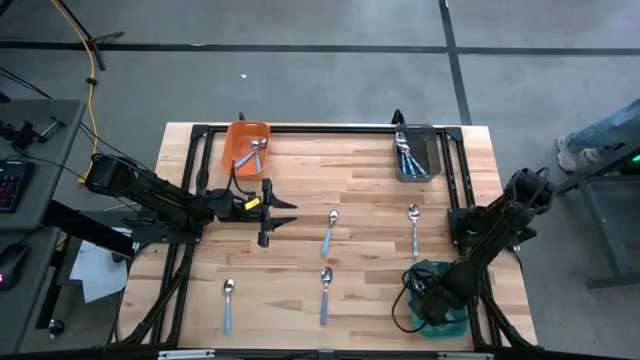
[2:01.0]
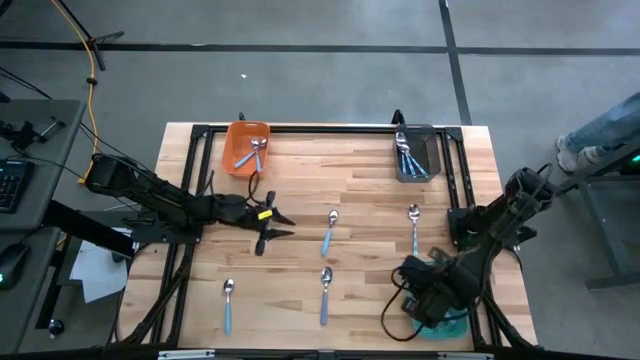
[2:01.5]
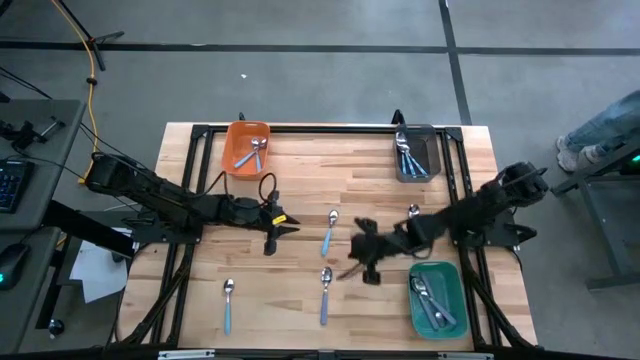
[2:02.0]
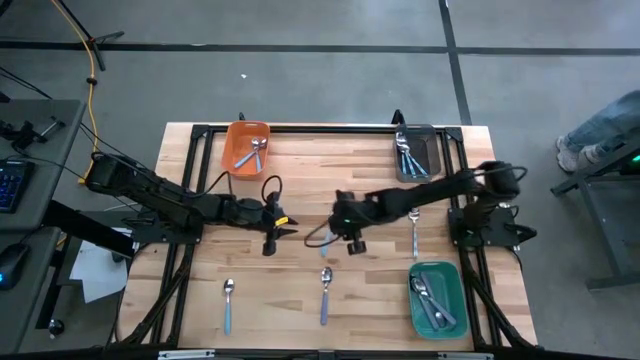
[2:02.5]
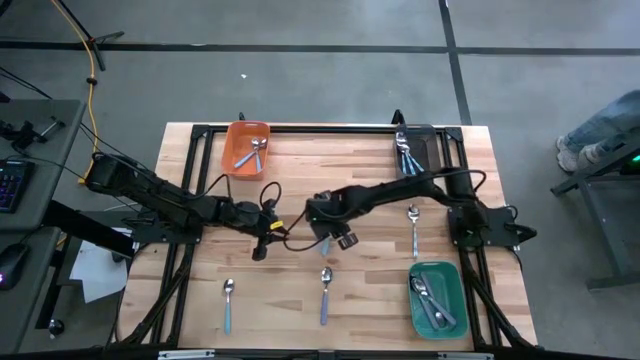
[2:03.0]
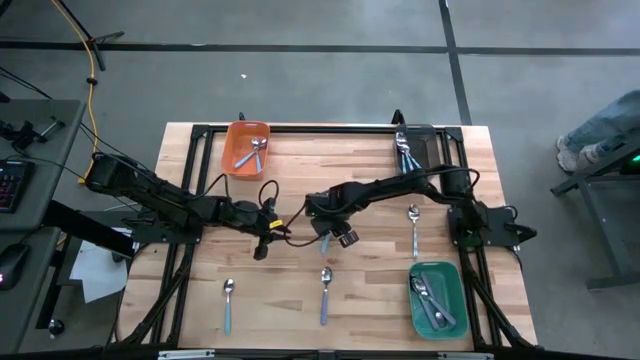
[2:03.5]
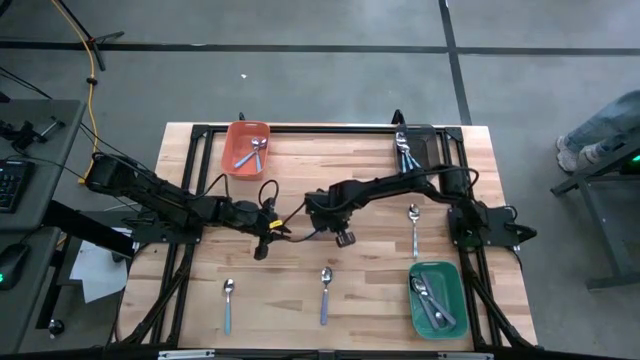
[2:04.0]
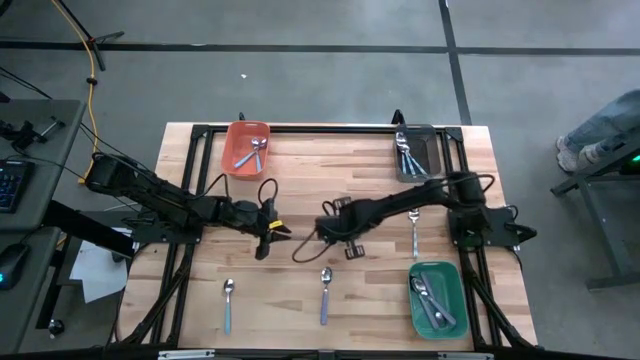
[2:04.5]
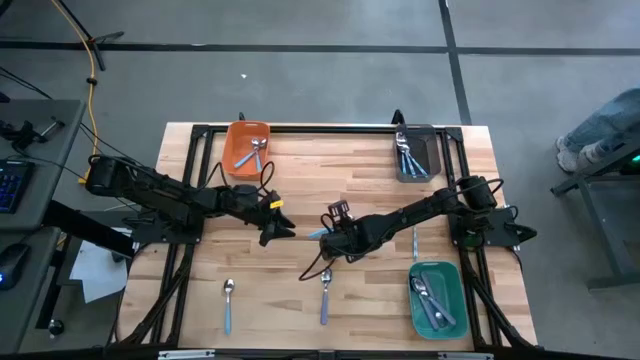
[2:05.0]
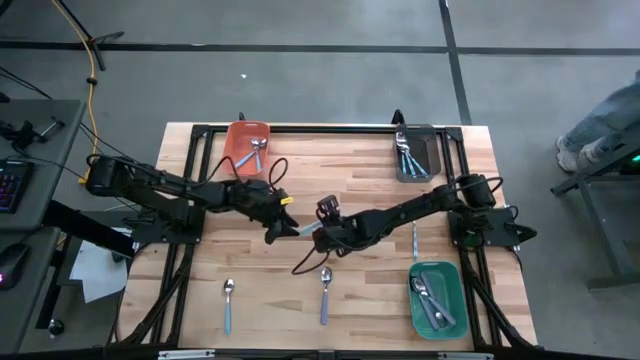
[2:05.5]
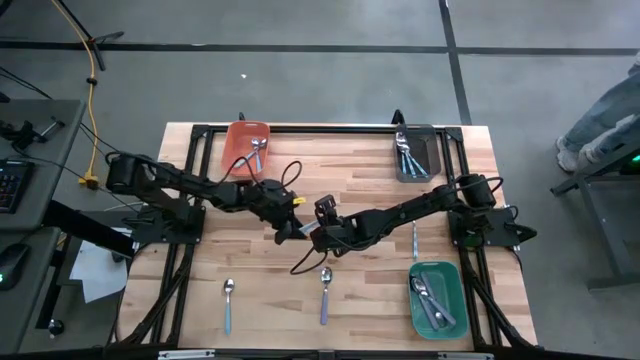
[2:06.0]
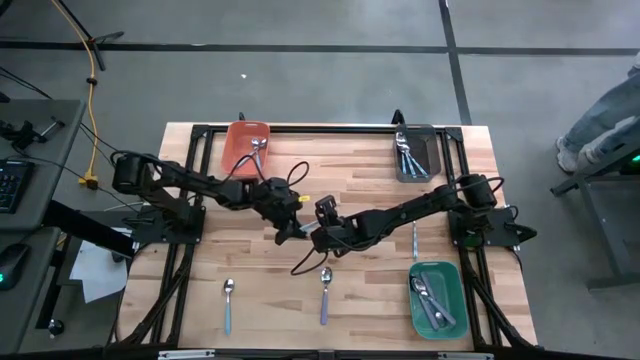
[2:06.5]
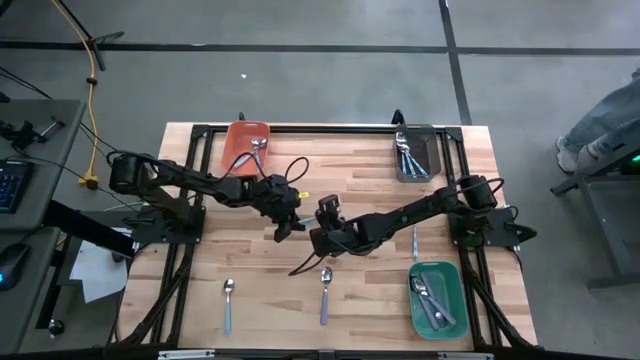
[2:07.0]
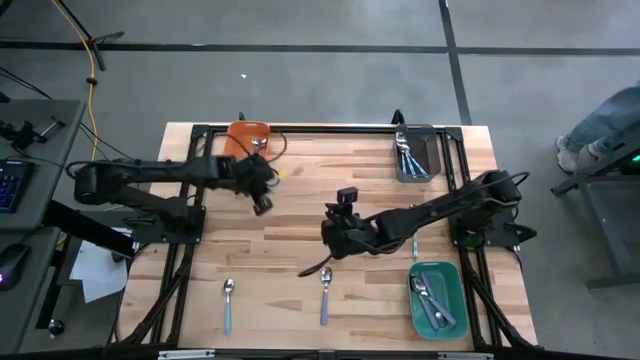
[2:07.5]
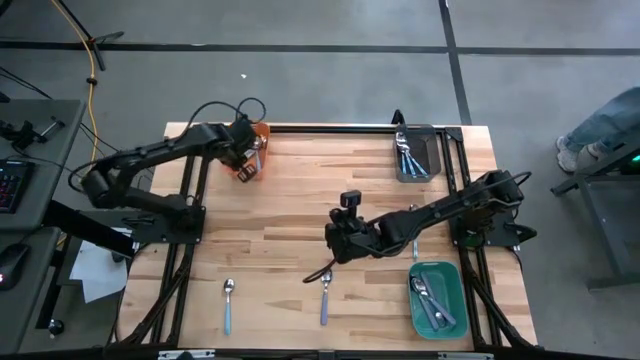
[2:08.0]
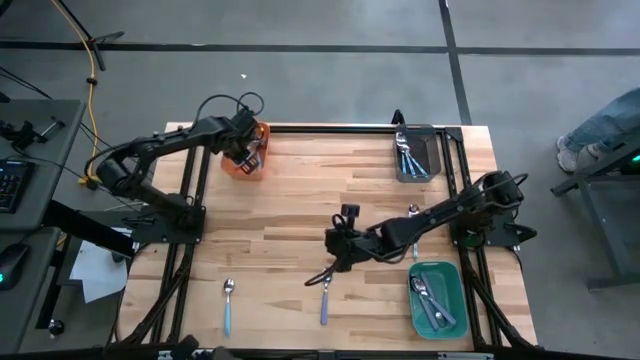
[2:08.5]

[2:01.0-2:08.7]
Task: Sort silverware by color (type)
Put the blue spoon into the orange bin

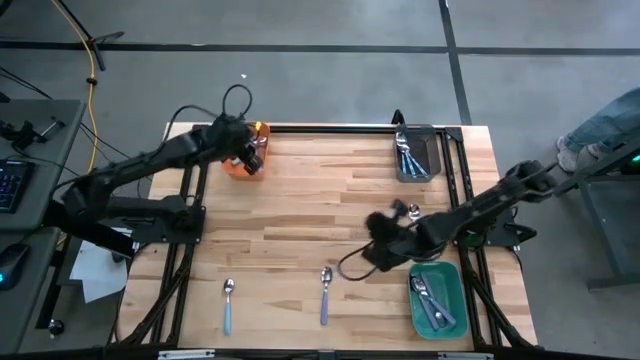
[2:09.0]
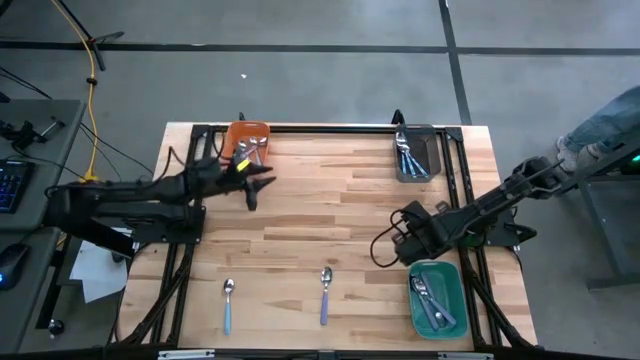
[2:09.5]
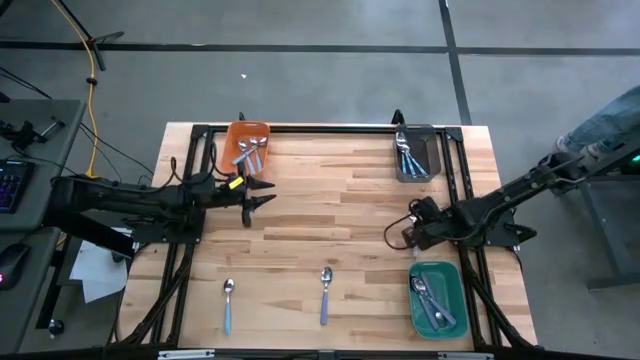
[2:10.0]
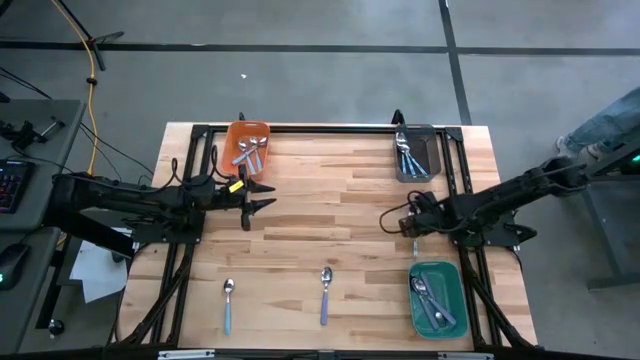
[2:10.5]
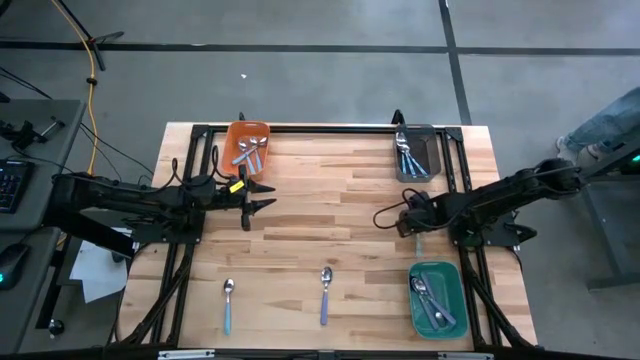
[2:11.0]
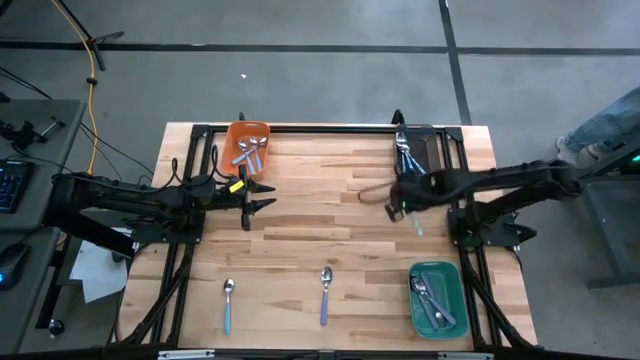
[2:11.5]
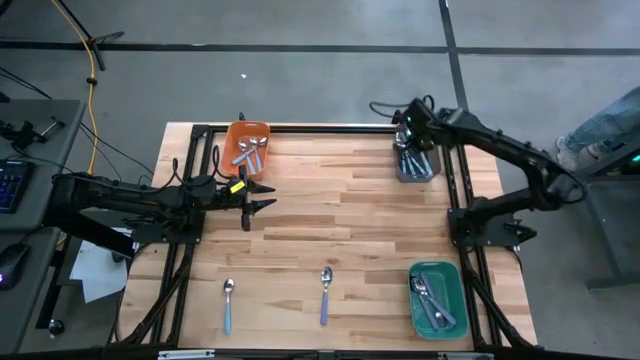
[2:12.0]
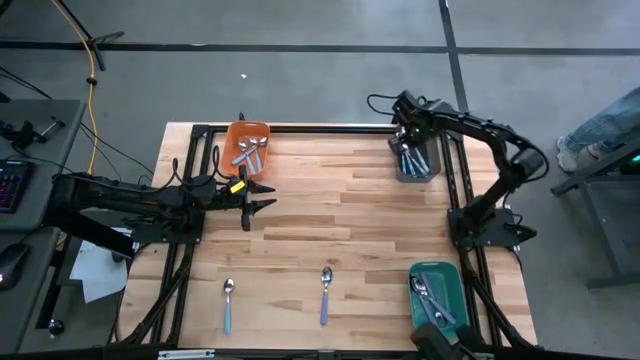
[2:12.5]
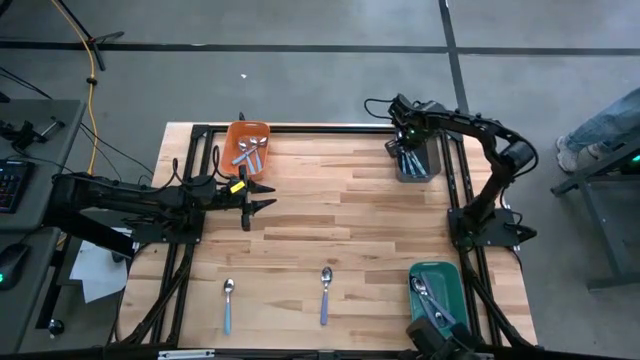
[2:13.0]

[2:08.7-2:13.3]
Put the white patterned spoon into the black bin

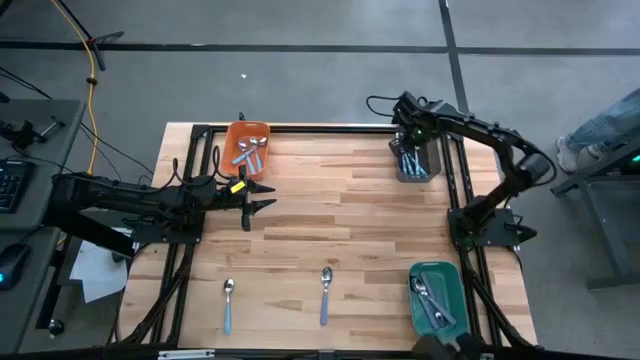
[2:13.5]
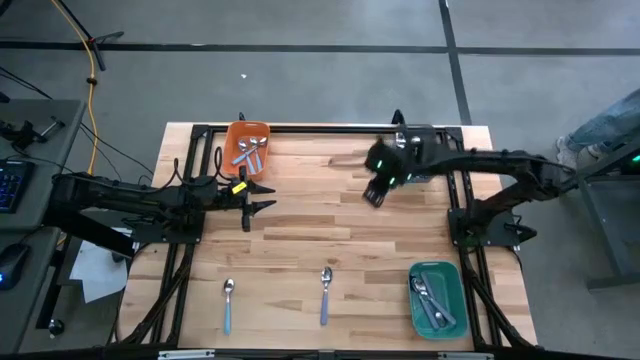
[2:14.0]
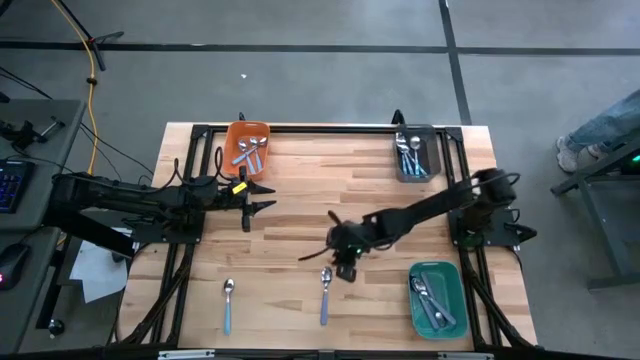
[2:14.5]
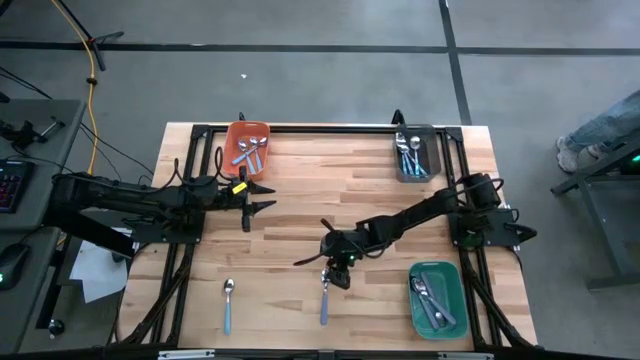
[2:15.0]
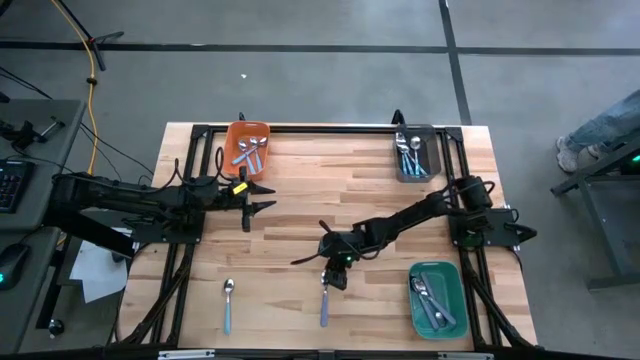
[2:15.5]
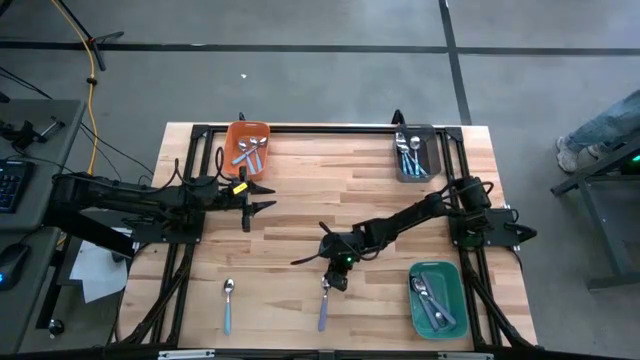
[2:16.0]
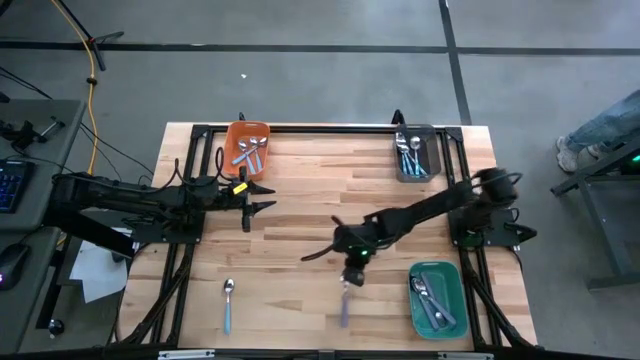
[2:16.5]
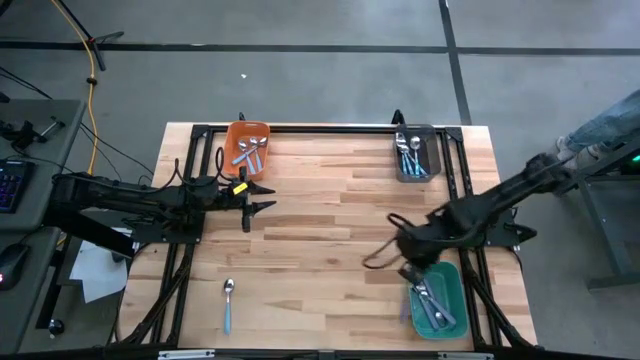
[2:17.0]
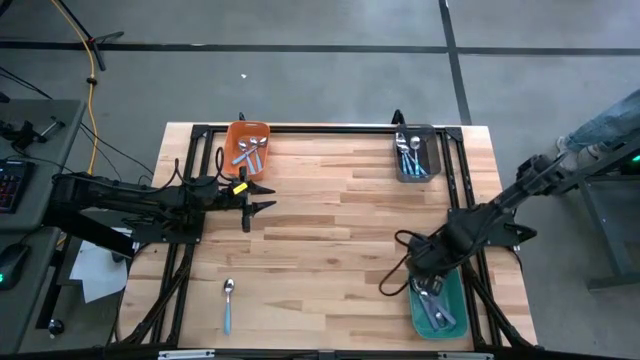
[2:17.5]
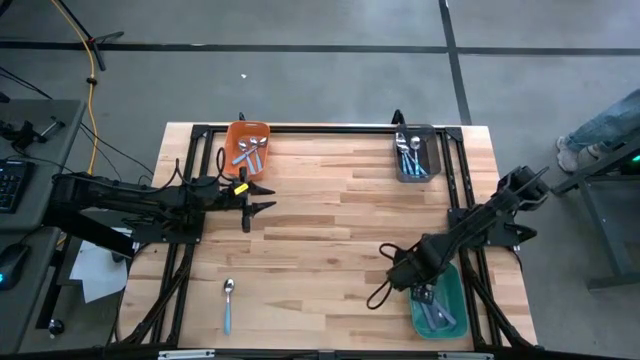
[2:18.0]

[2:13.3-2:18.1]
Put the purple spoon into the green bin

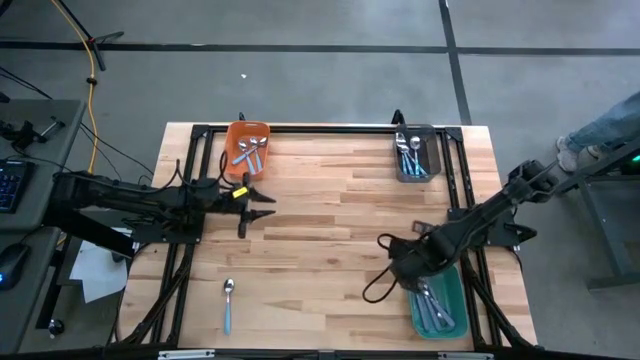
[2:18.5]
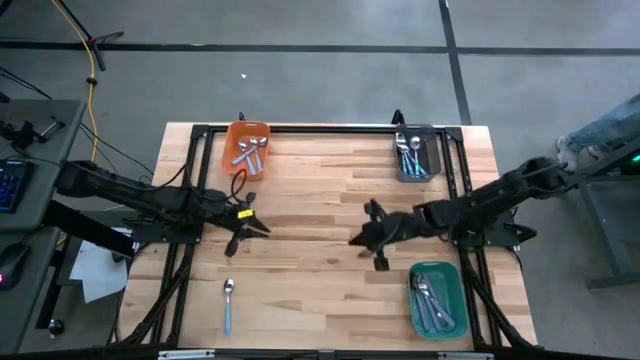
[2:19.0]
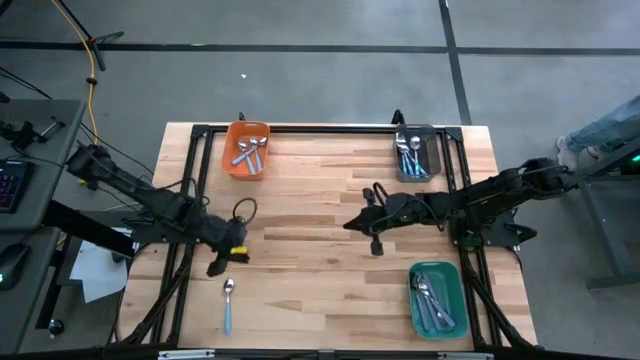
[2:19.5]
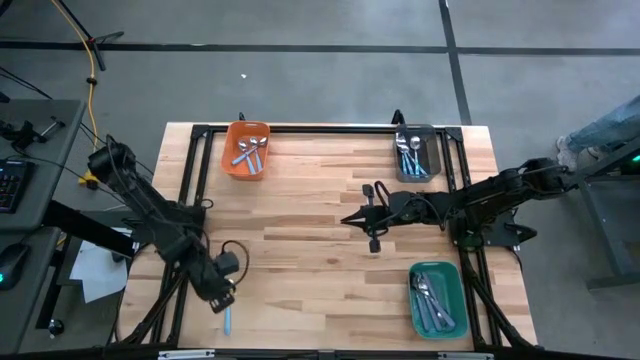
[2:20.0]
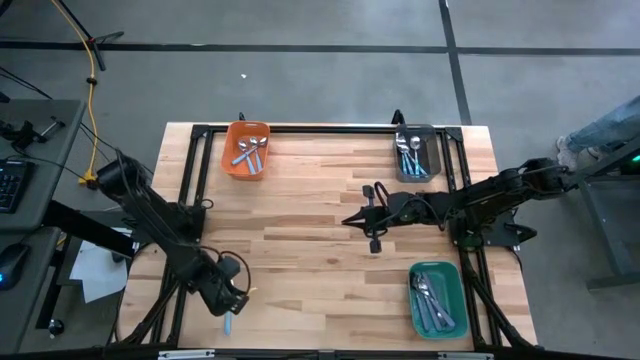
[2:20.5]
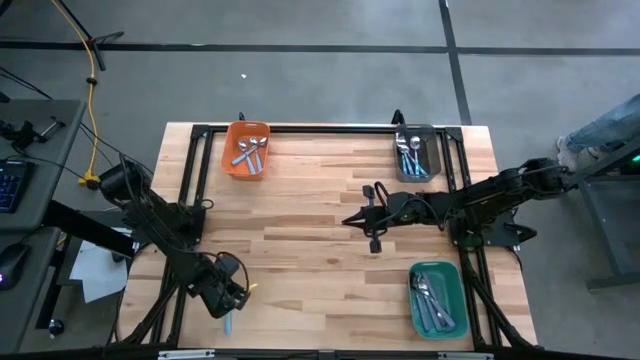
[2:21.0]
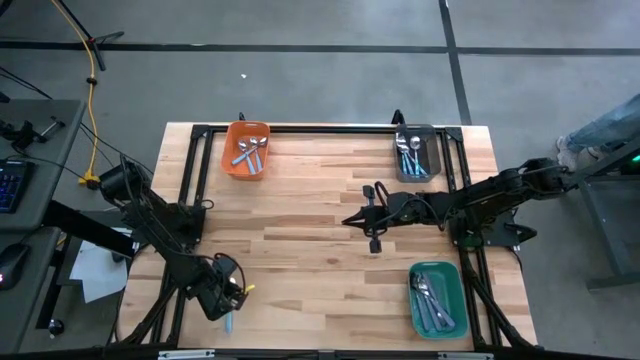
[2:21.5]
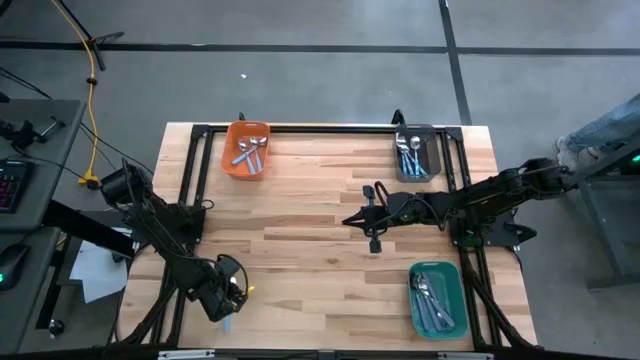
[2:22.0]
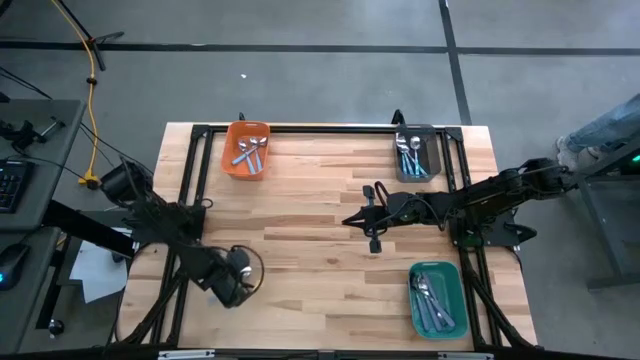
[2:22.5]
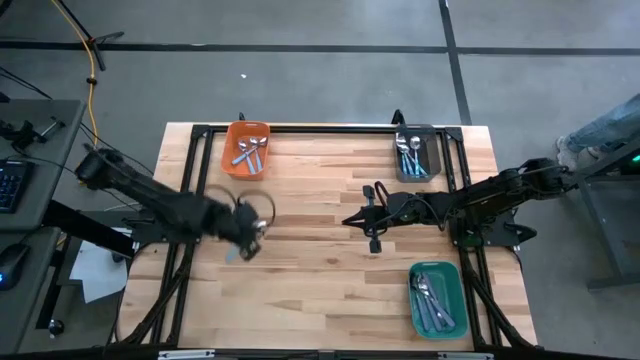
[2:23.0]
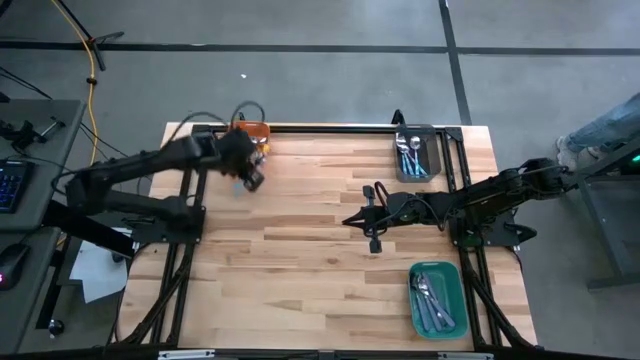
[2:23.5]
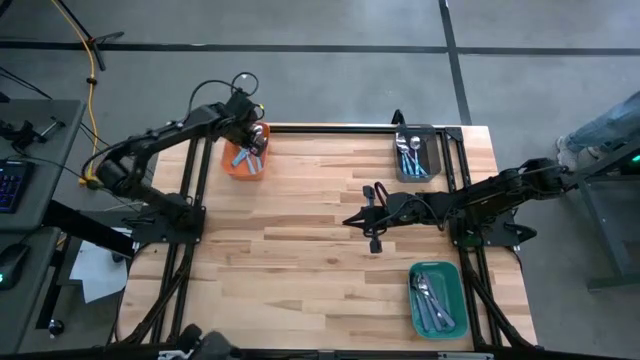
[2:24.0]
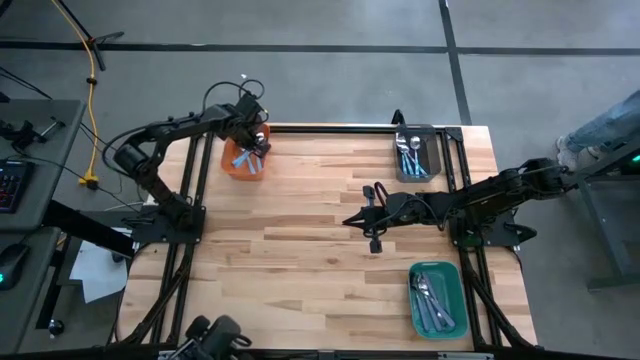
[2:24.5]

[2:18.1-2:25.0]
Put the blue spoon into the orange bin
